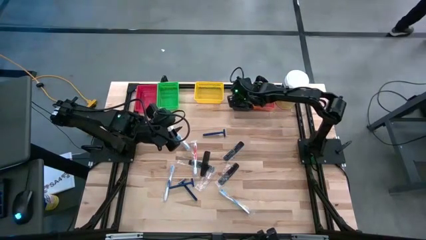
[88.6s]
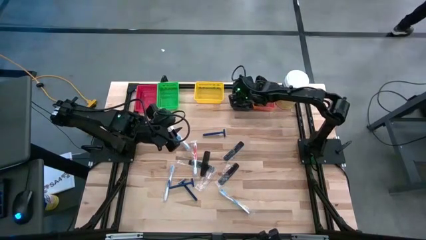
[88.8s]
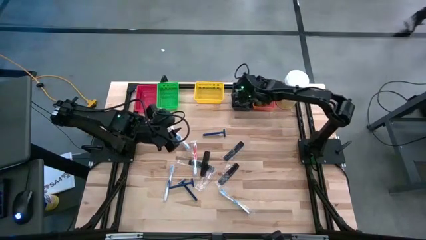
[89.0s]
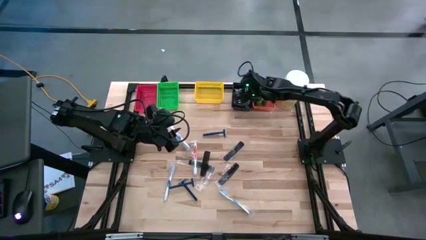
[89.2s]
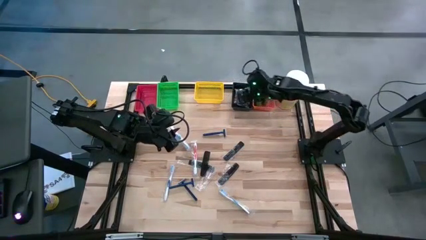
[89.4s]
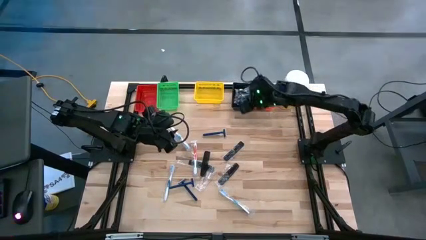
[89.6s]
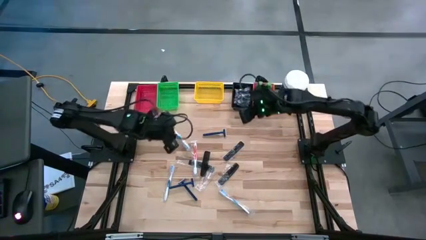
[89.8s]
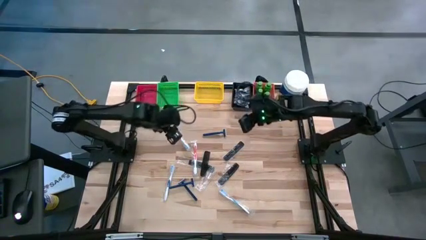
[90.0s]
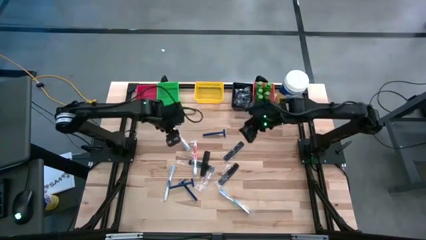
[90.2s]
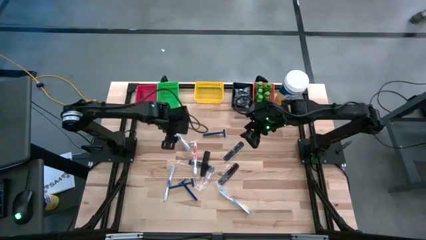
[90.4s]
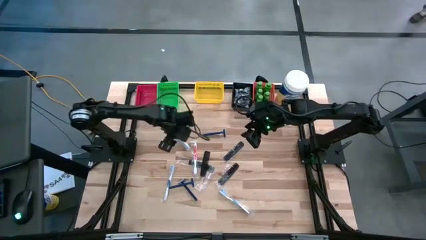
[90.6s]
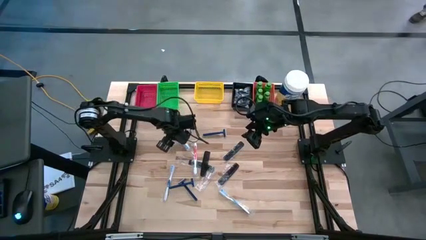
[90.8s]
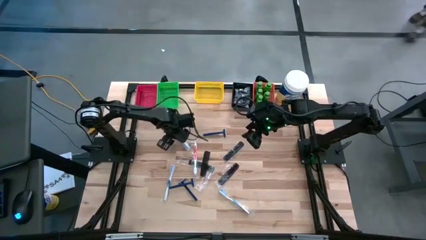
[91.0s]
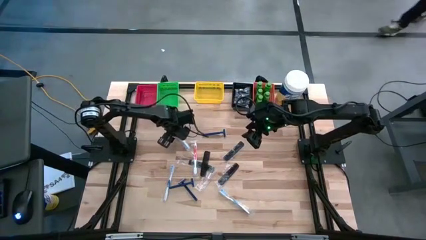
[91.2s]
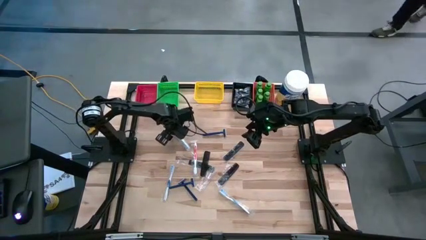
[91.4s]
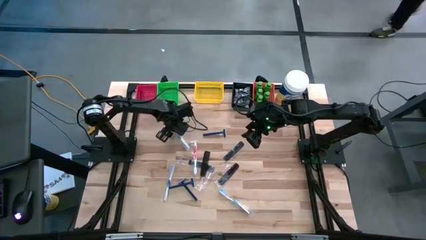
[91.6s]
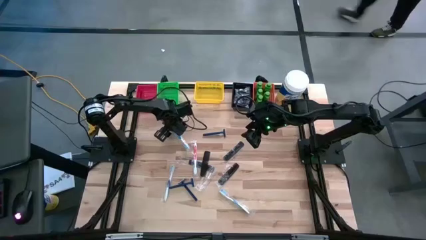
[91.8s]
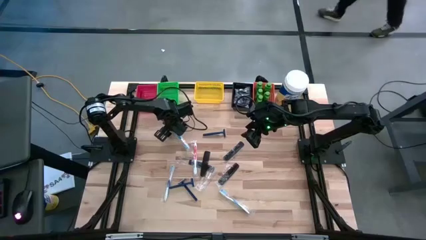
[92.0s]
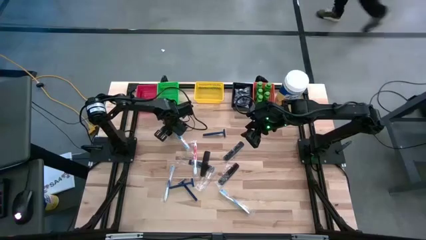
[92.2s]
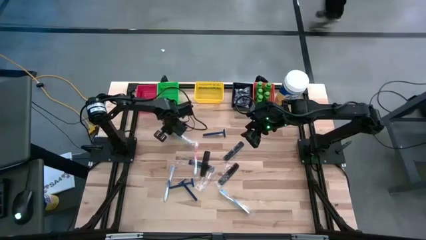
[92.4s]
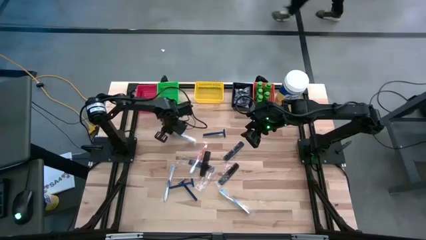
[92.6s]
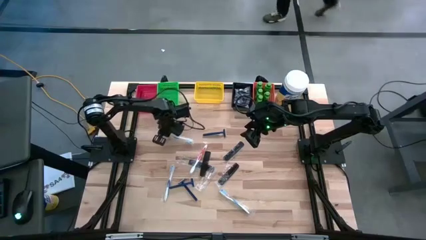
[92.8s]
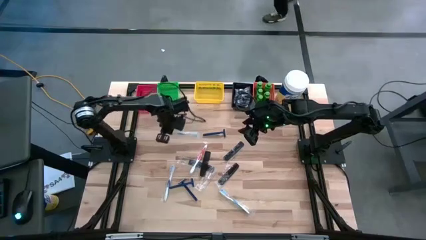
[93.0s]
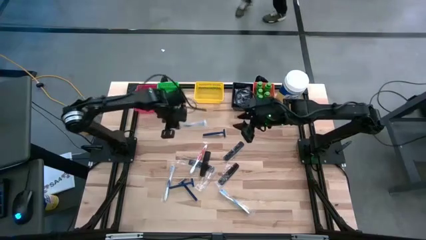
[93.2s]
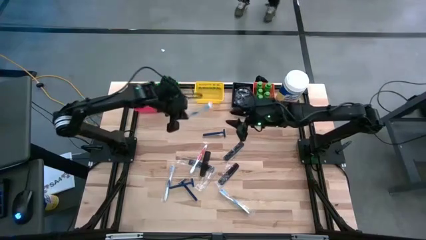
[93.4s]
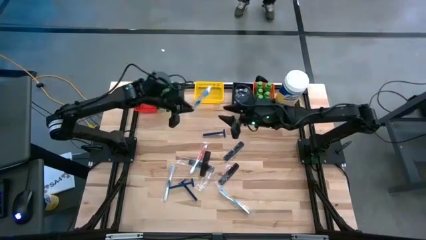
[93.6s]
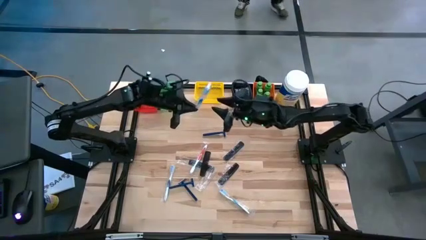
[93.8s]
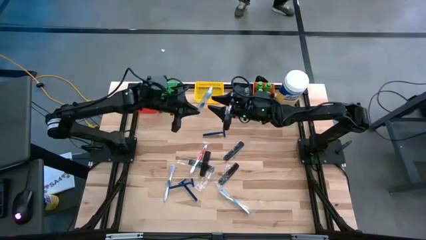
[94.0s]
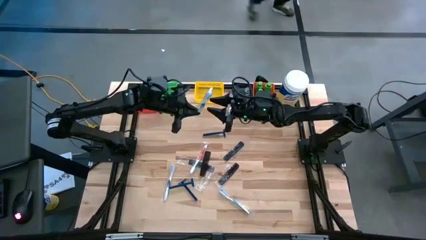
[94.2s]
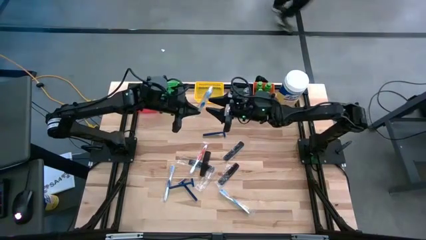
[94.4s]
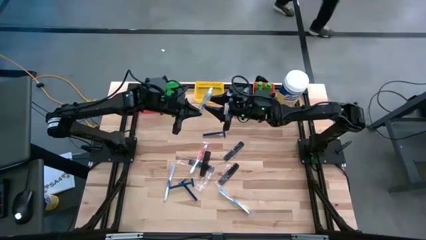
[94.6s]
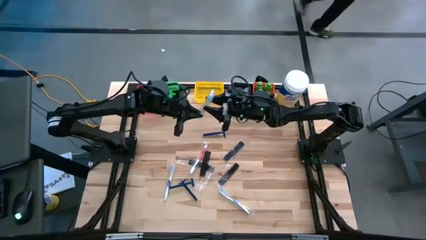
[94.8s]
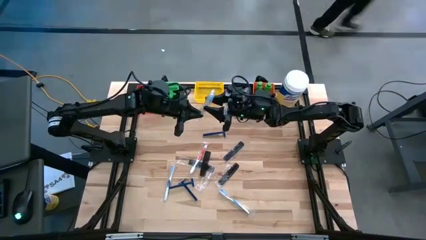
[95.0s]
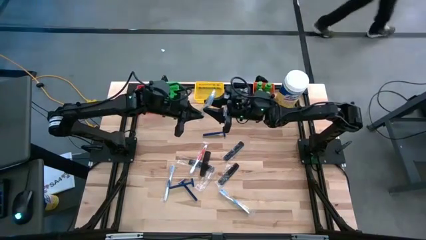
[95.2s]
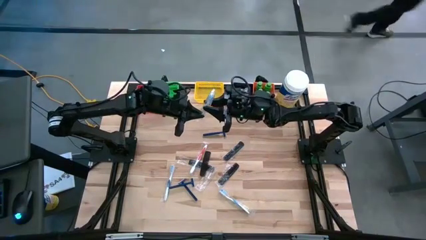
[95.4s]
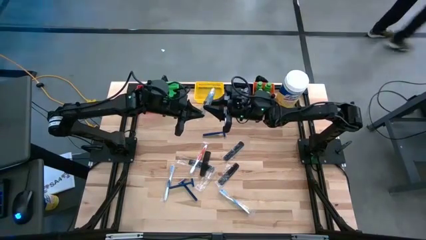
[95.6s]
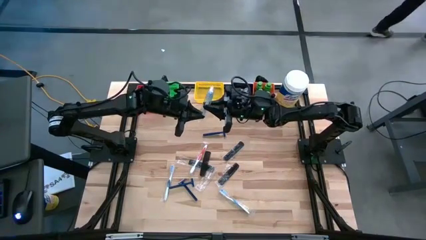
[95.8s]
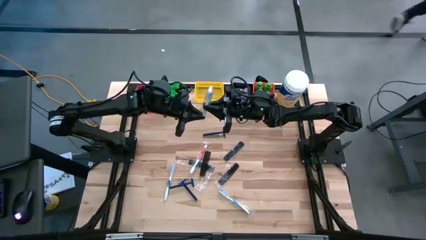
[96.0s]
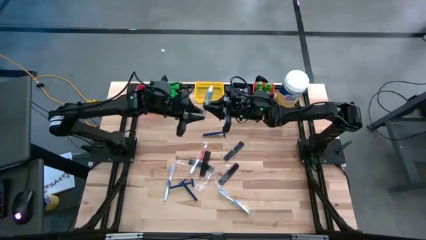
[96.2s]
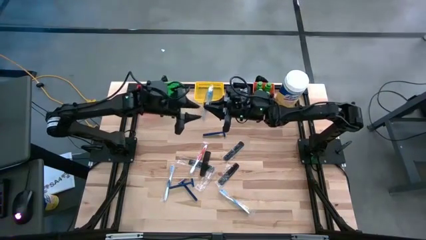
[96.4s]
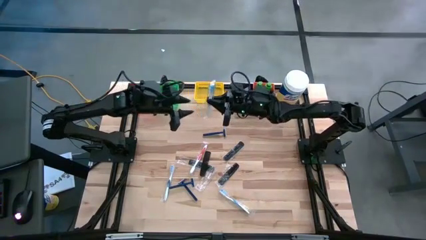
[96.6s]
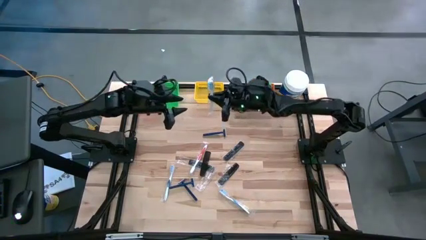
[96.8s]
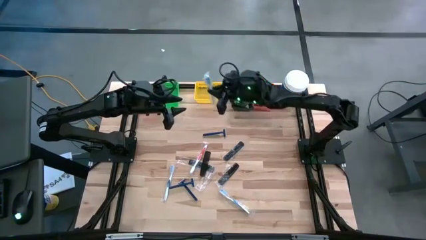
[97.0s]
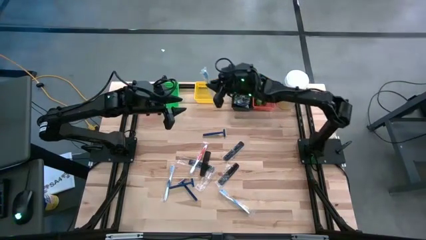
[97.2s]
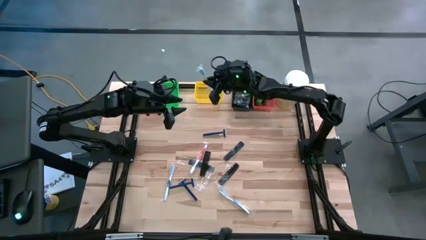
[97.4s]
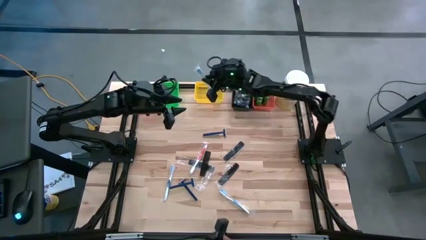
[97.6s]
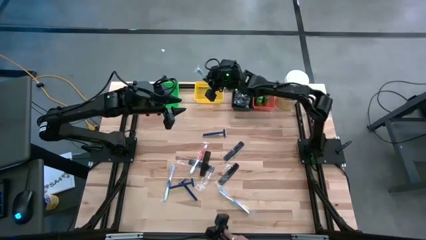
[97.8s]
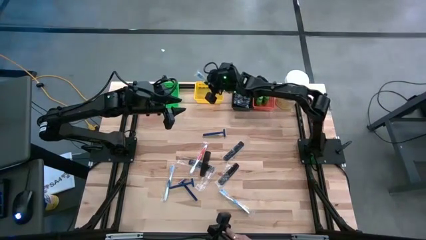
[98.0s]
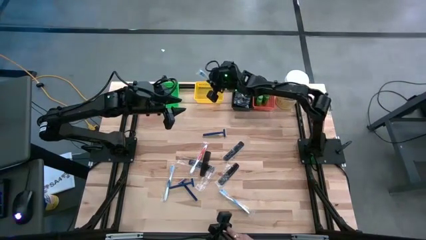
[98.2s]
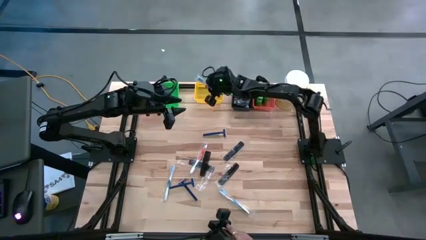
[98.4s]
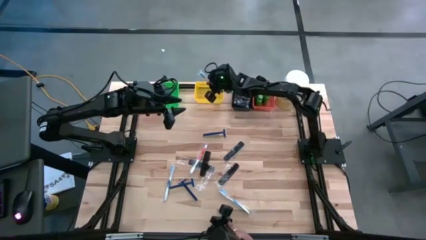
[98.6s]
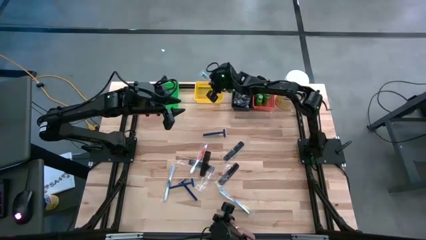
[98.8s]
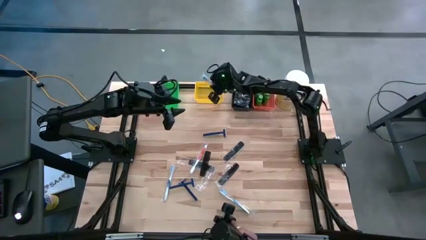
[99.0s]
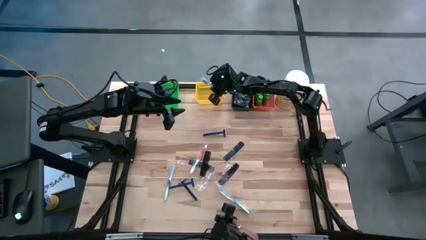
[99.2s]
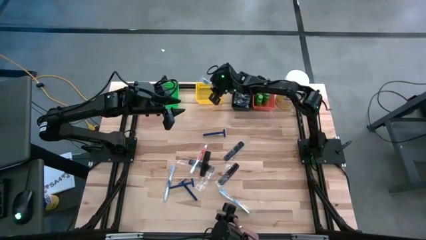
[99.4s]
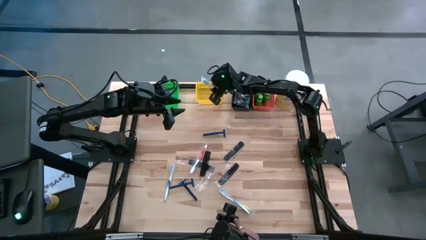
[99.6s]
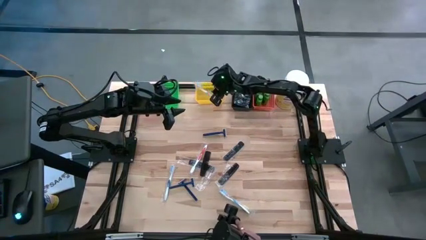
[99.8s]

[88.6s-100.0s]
Task: Pick & Place Travel size toiletries
Put the light blue toothbrush into the yellow bin

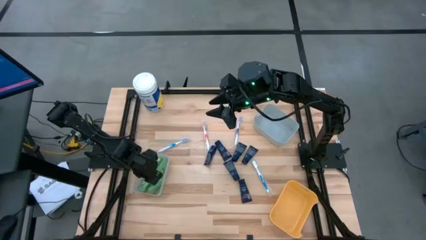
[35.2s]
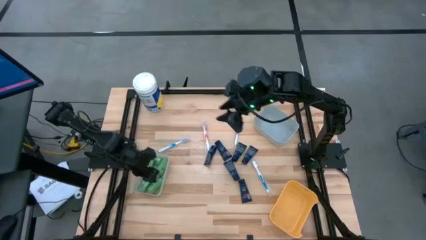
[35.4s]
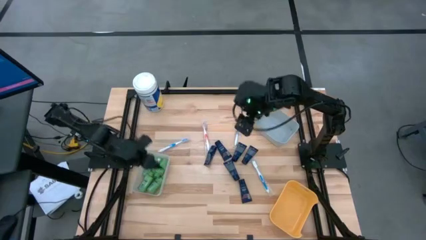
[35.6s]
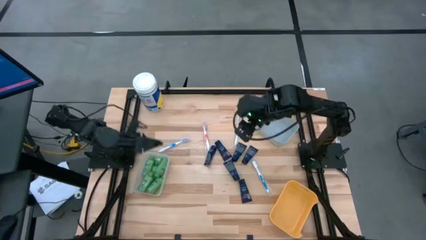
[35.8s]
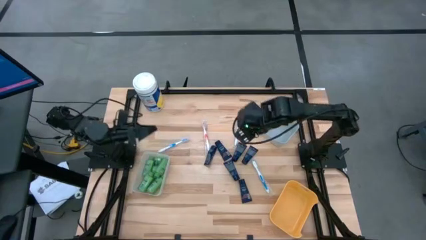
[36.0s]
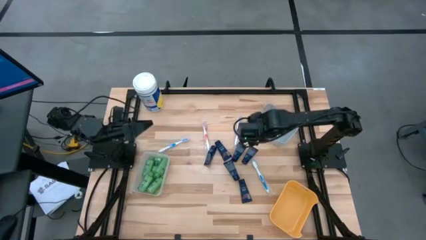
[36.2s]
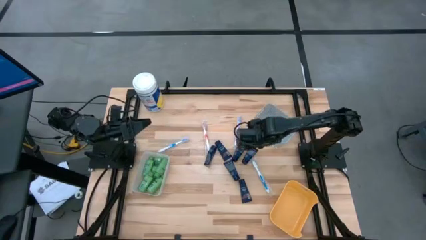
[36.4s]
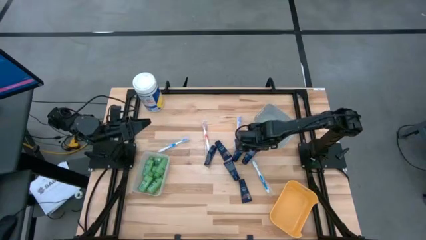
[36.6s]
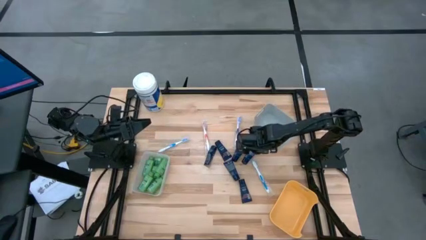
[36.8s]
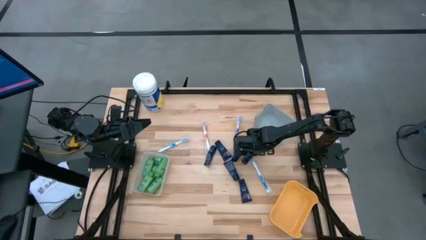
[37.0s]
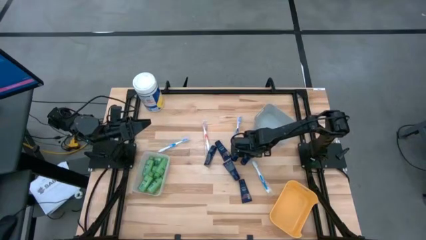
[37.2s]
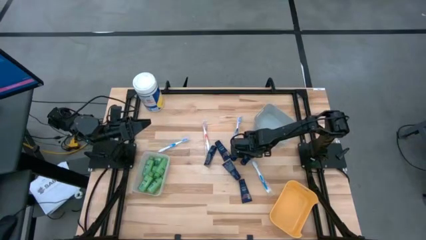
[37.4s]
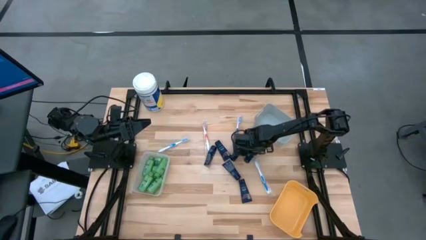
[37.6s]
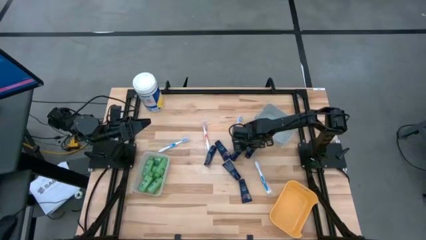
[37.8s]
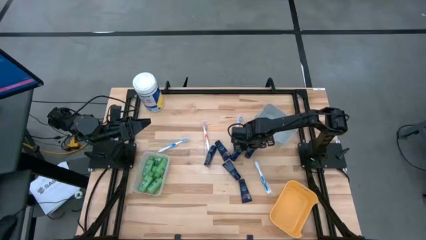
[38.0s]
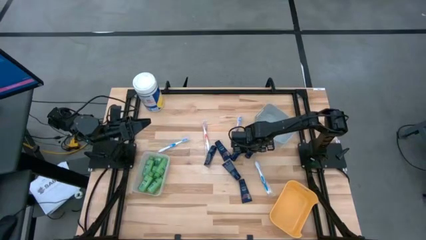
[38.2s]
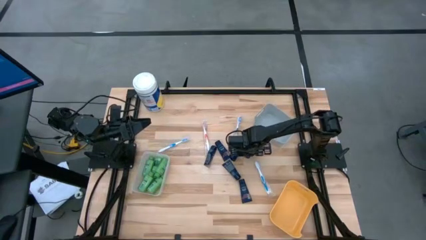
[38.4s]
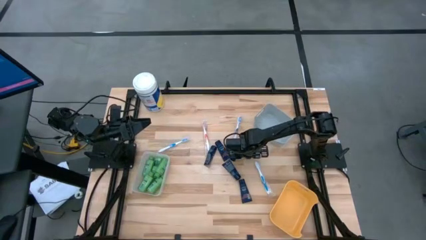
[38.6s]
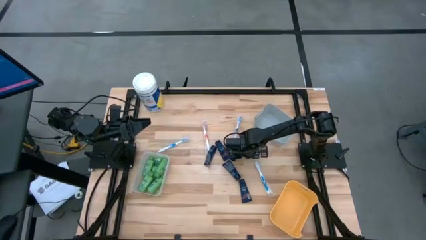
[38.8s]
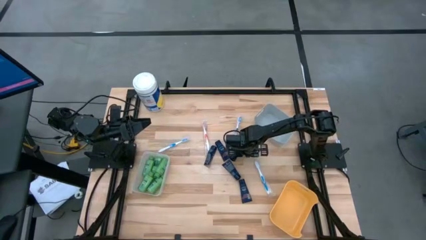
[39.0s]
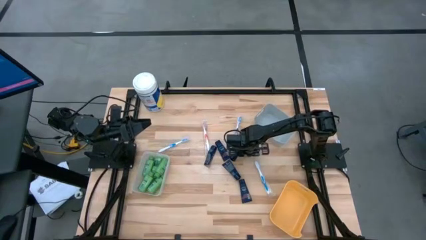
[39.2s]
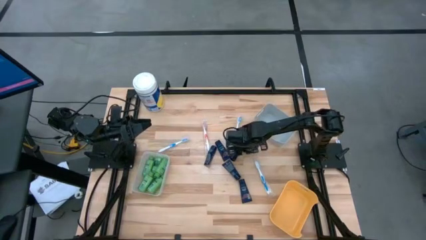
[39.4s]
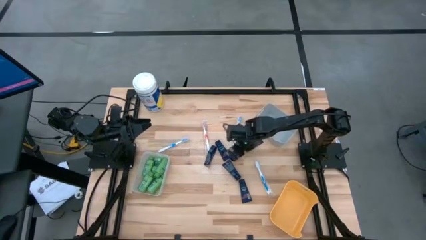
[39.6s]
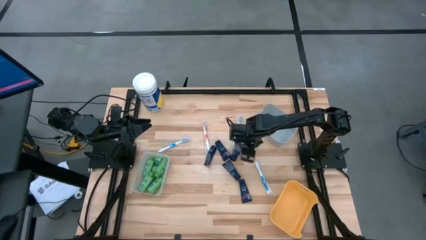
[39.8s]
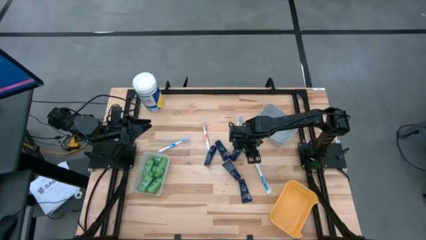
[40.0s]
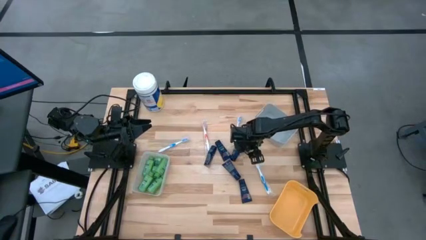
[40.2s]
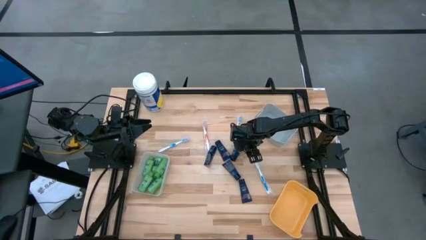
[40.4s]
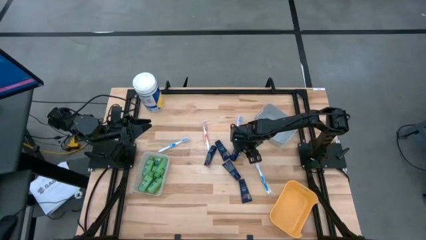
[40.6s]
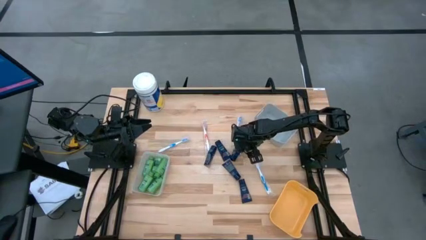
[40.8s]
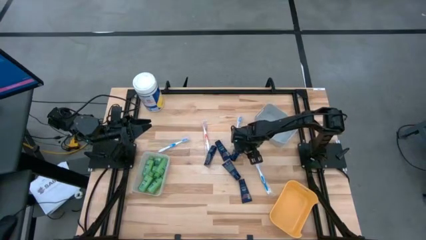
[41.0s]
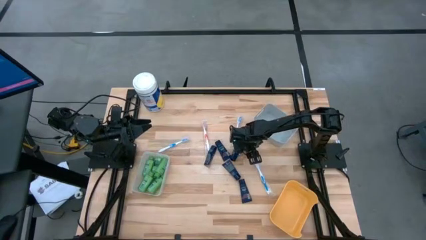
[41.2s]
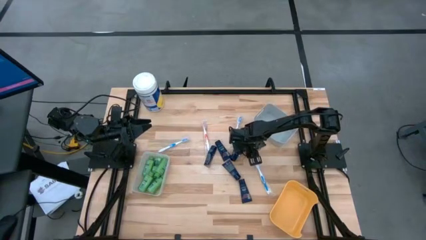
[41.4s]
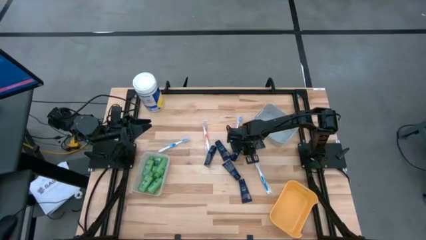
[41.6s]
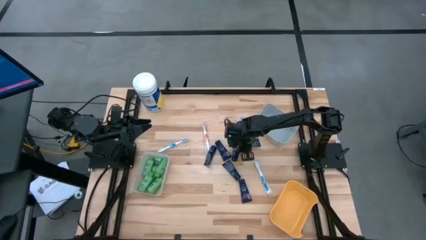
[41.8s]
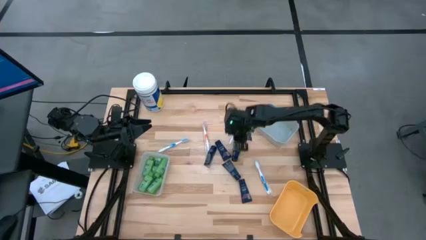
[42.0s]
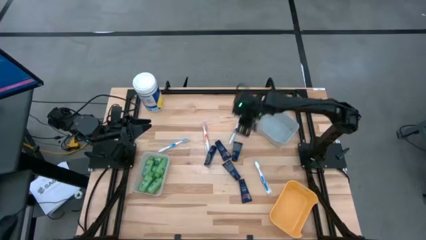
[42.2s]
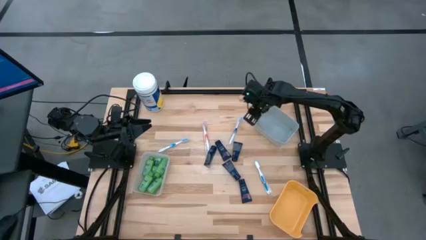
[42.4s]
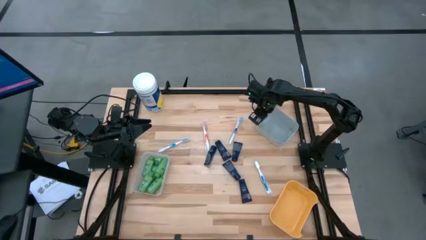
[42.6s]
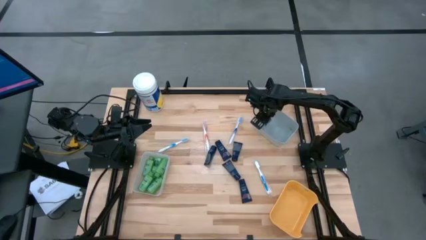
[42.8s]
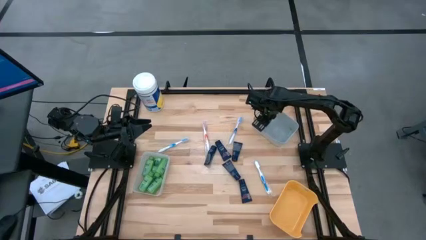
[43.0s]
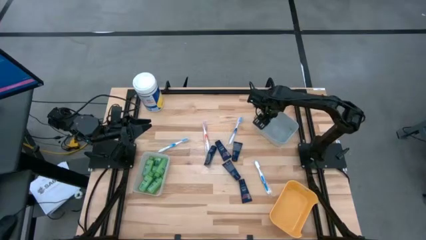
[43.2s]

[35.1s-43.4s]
Task: Pick & Place Travel size toiletries
Put the blue shave cream tube into the gray bin
